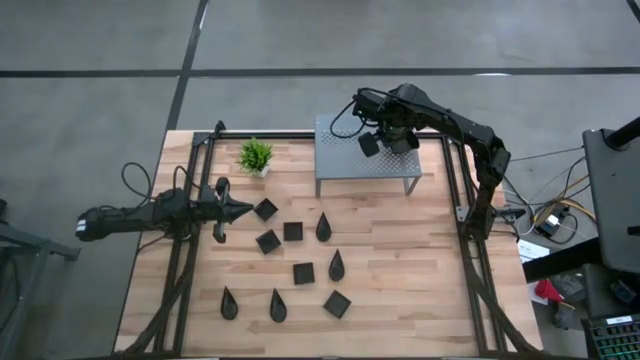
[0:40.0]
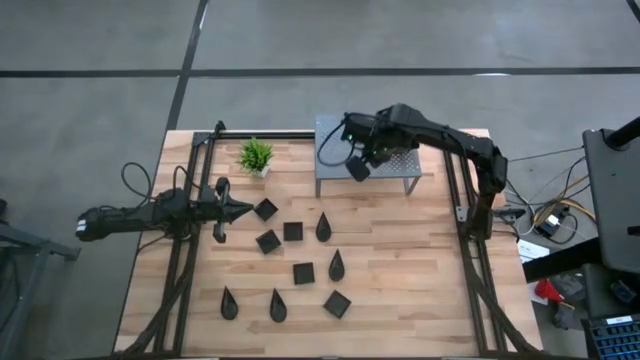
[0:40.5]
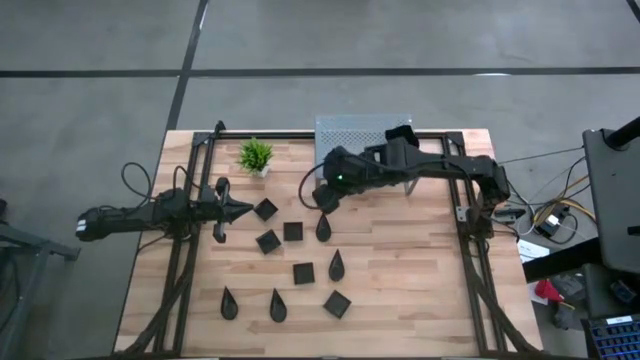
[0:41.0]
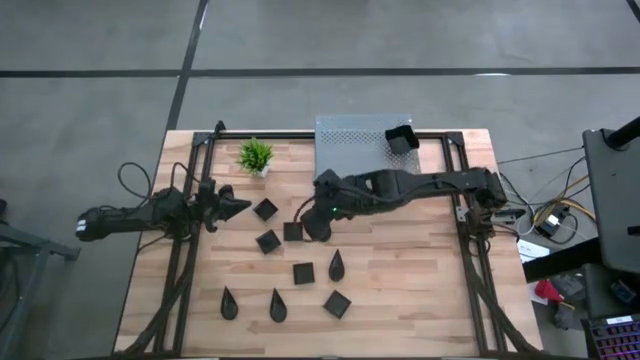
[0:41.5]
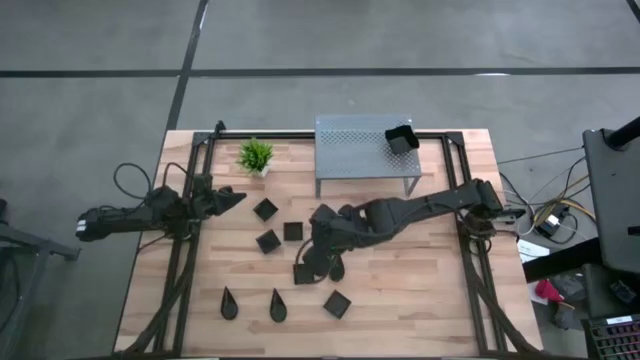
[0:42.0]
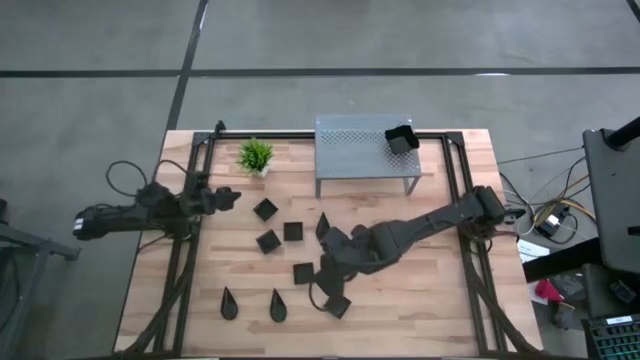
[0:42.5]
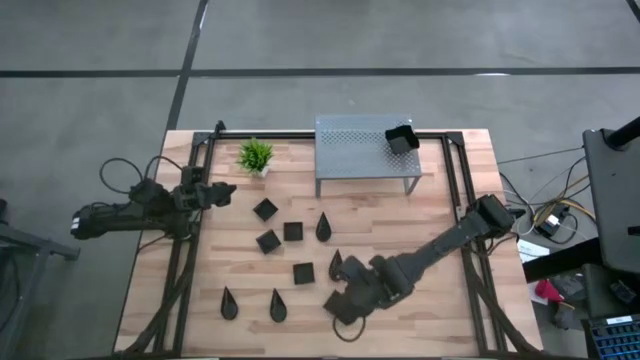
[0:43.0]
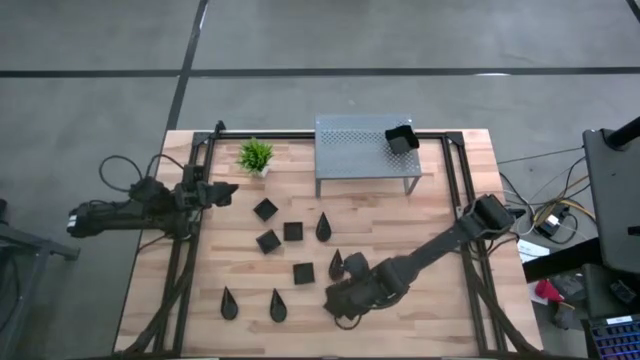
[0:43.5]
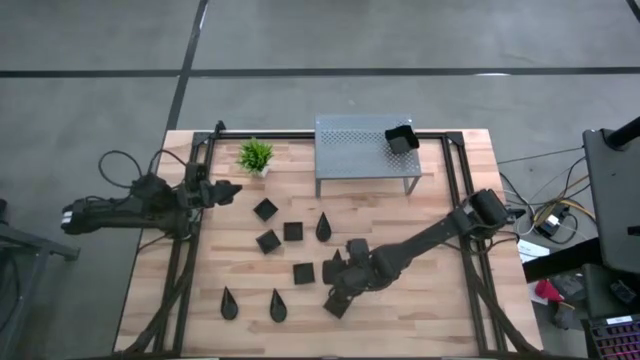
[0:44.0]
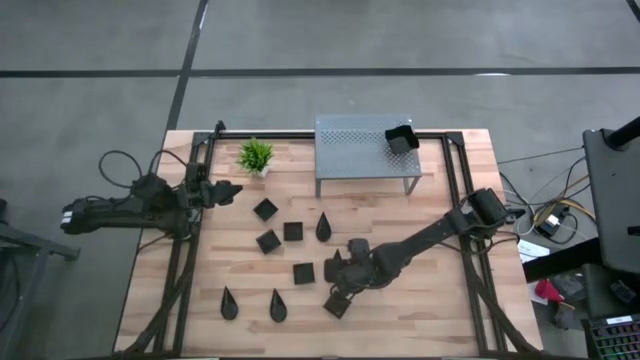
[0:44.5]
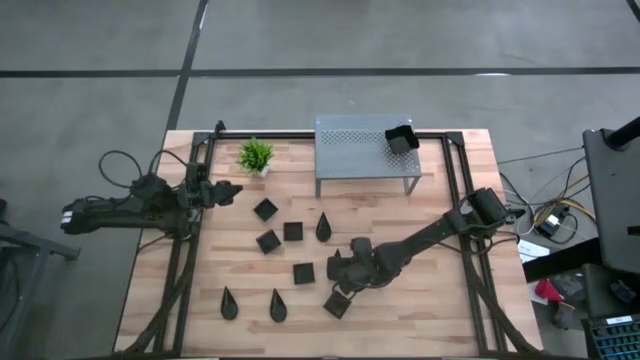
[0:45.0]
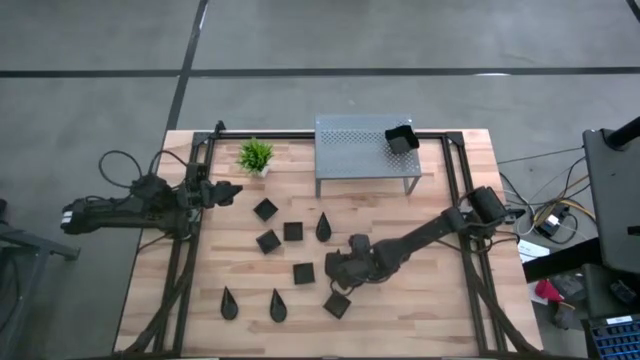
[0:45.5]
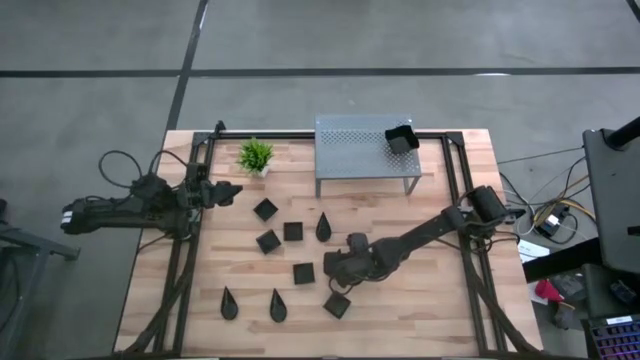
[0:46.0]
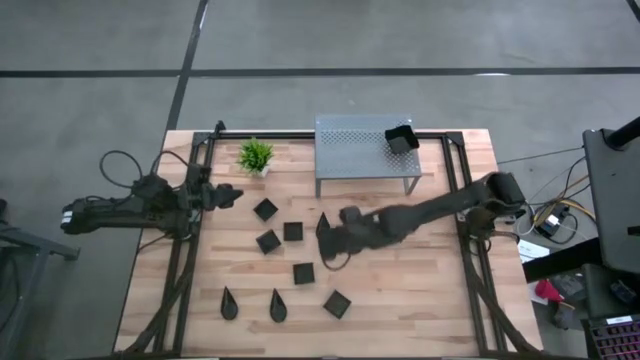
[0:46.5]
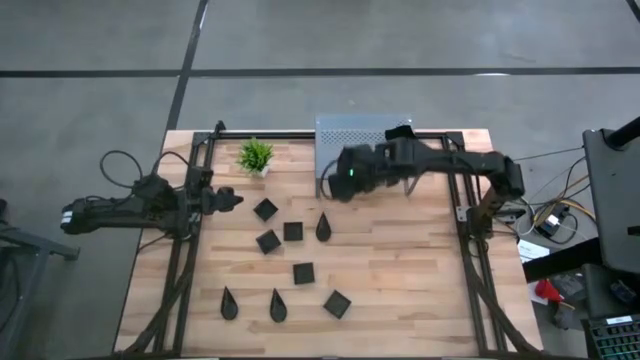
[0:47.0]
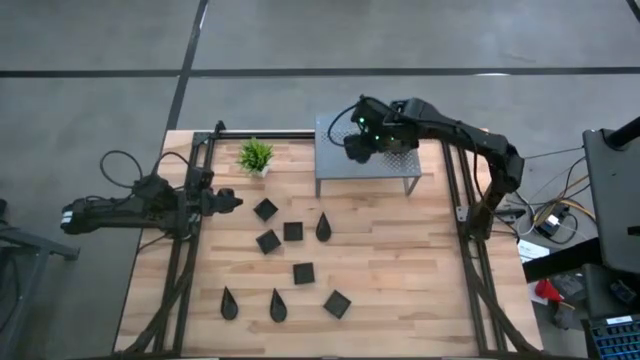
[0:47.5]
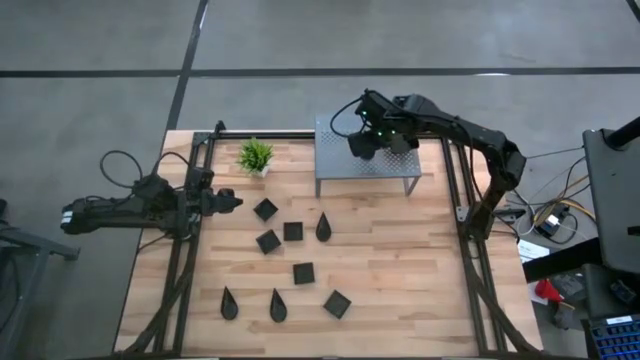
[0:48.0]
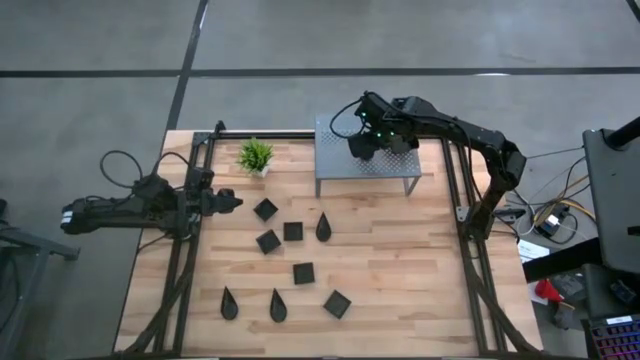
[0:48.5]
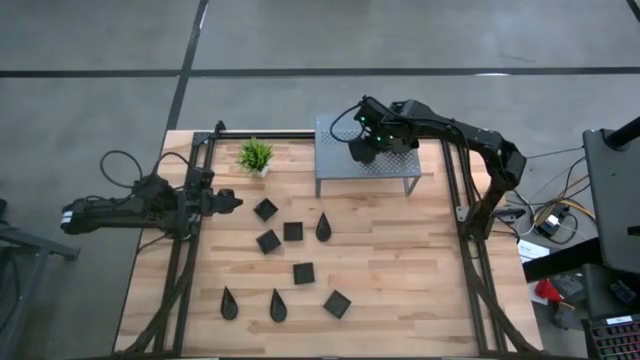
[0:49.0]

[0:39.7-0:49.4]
Task: Pick & Place Mini shaped plates
Put the black drop-shaped plate on the shelf

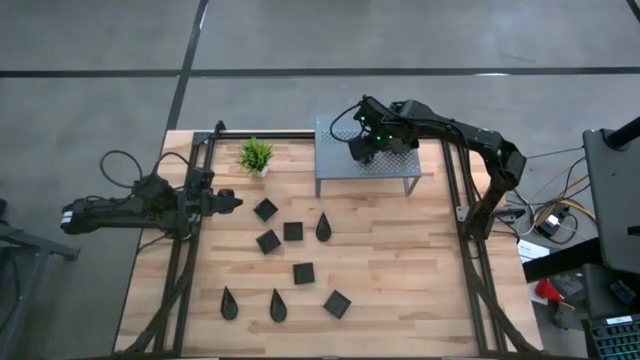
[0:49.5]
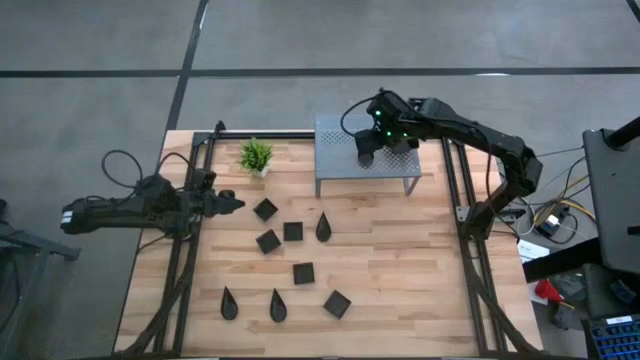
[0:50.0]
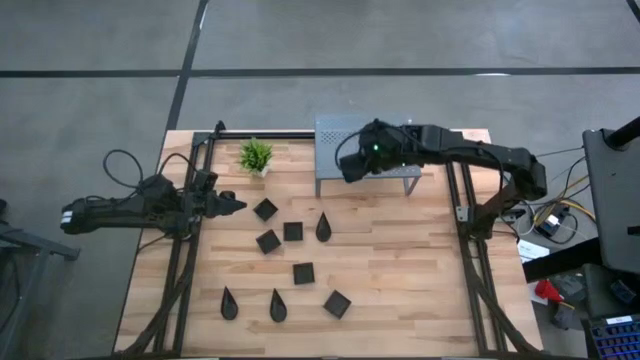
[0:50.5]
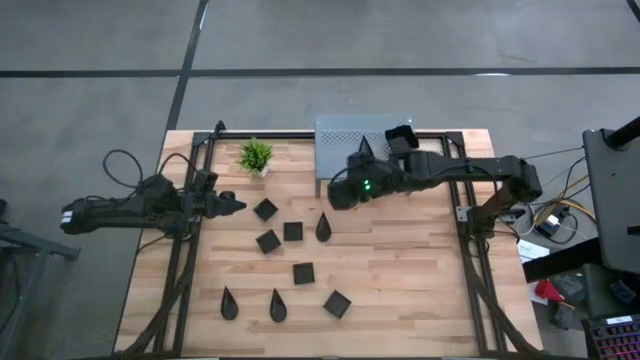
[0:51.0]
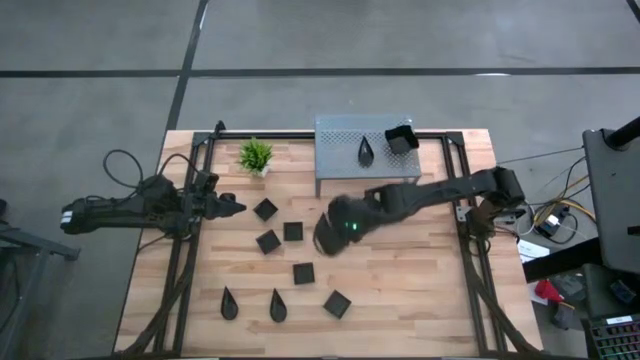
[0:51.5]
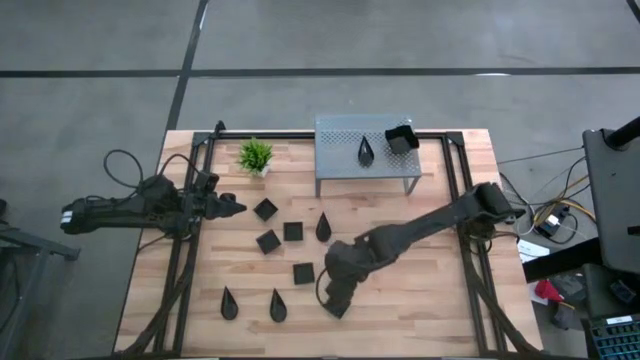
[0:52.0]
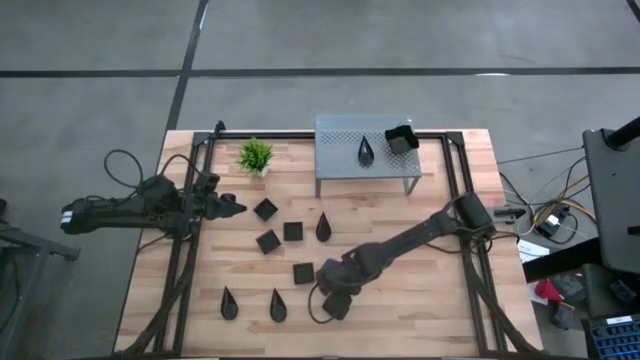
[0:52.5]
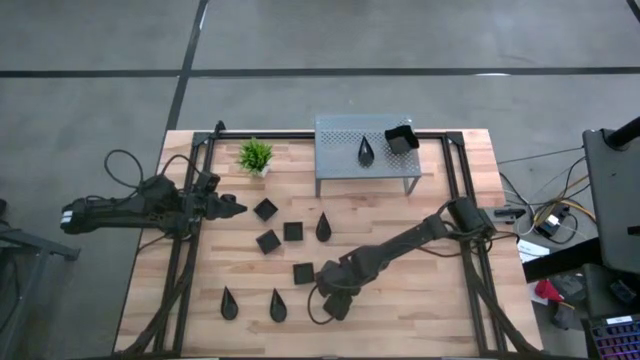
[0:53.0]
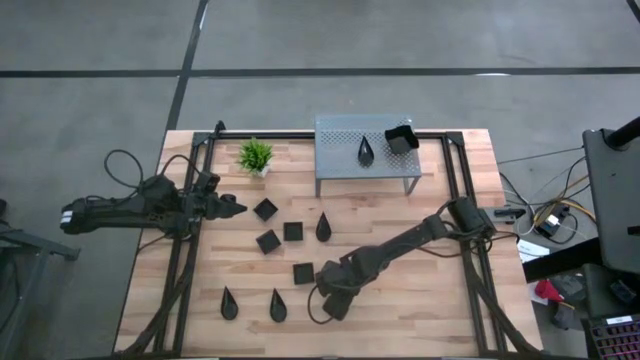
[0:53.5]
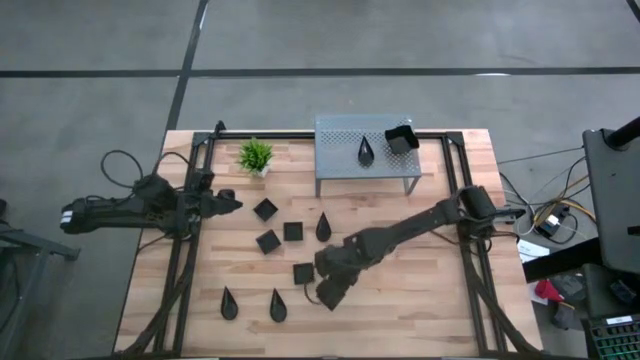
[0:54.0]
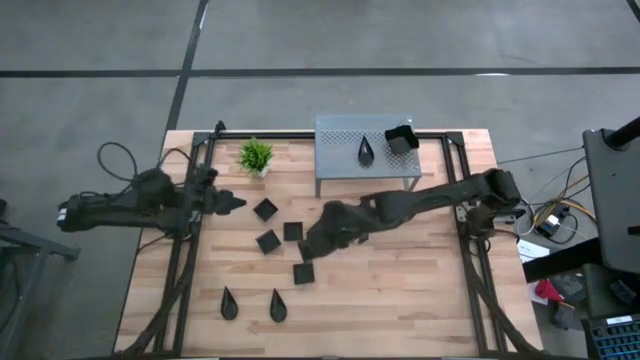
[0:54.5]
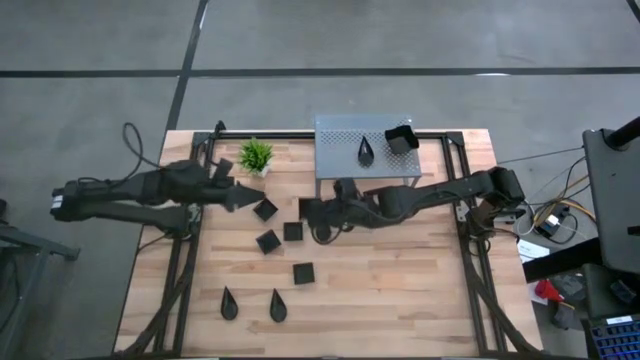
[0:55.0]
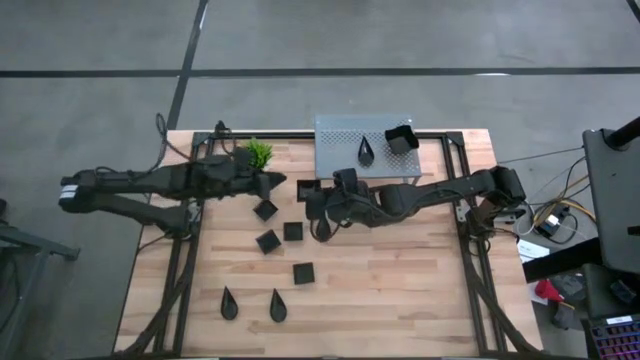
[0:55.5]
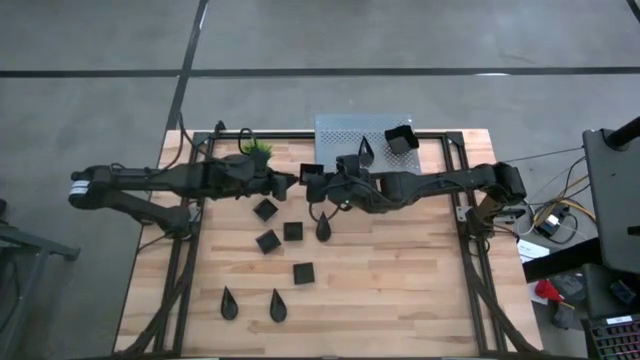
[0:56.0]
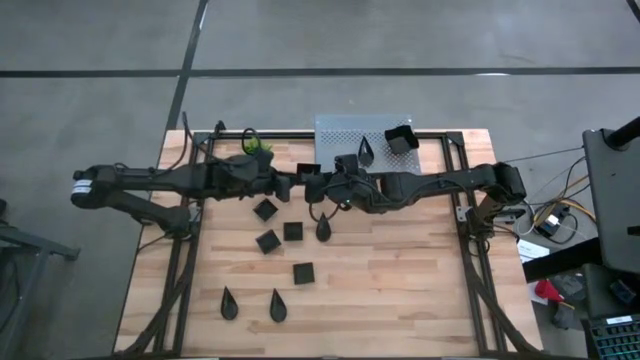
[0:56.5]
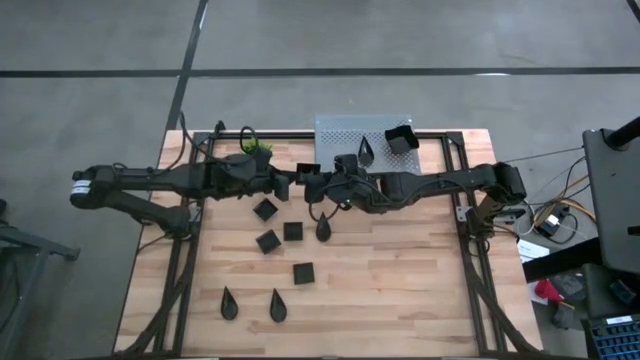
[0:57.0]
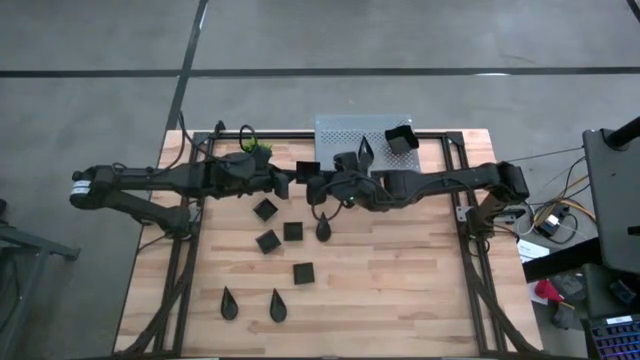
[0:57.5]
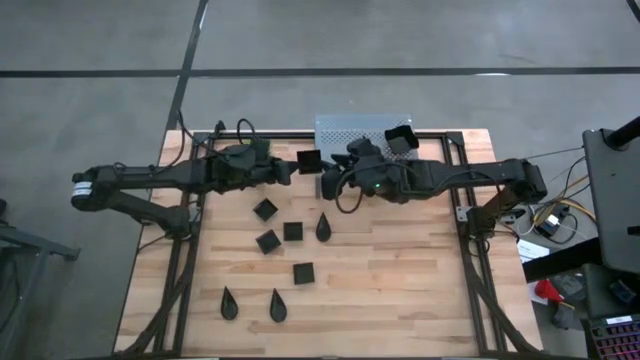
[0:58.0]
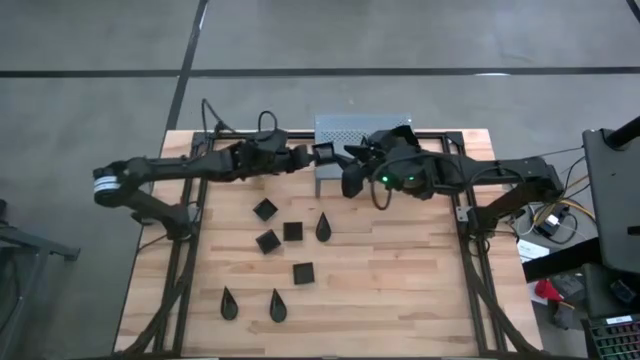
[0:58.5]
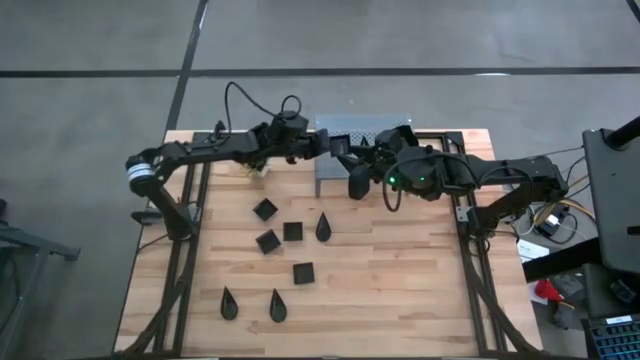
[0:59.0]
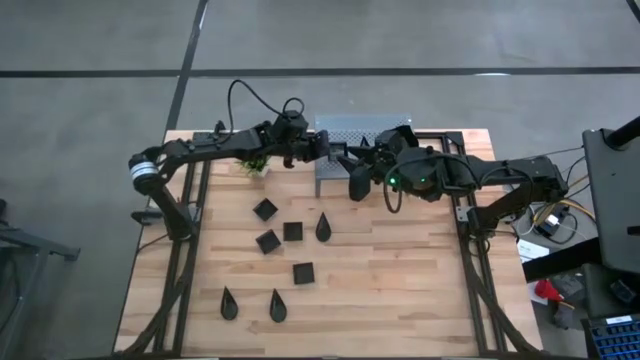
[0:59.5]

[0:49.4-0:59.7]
Put the black square plate on the shelf
